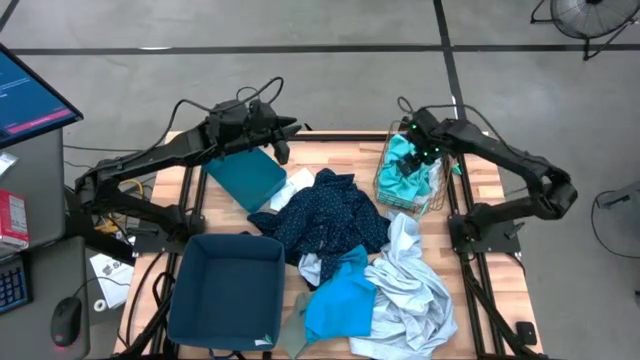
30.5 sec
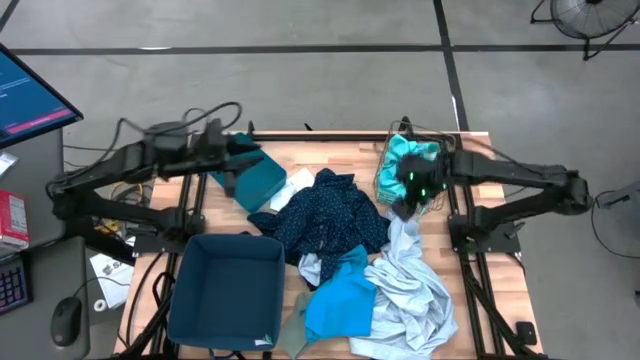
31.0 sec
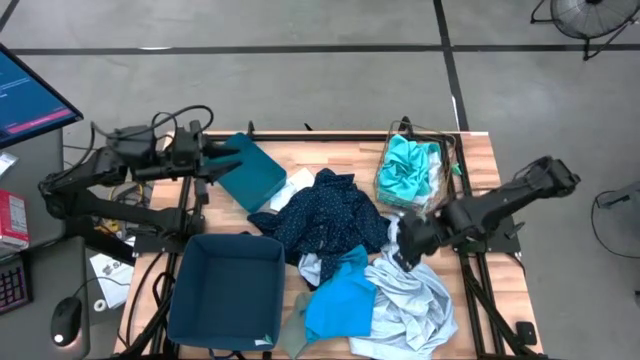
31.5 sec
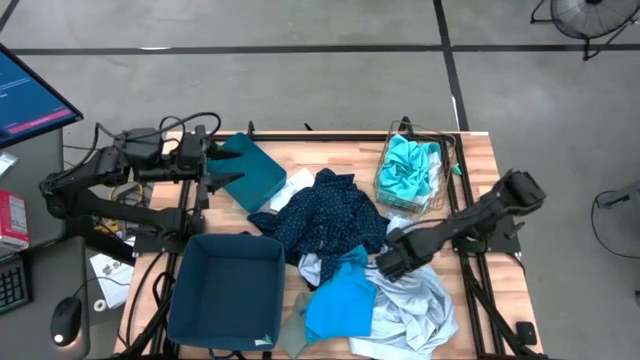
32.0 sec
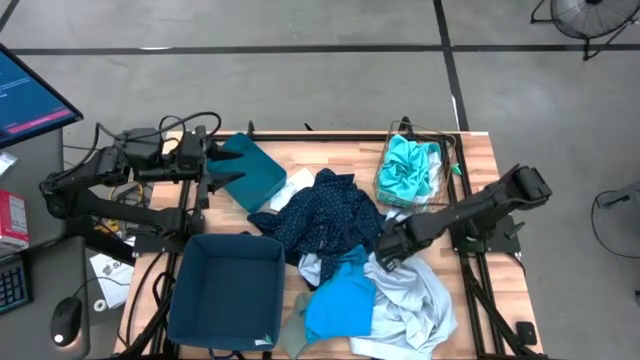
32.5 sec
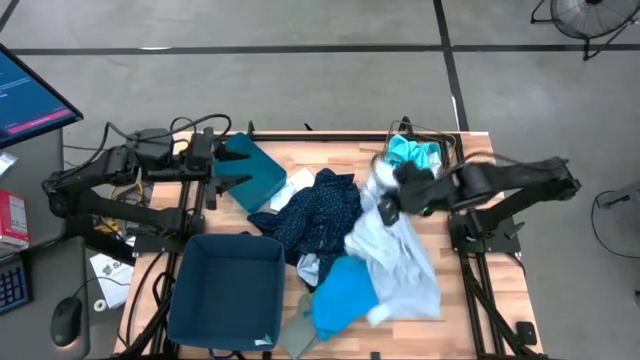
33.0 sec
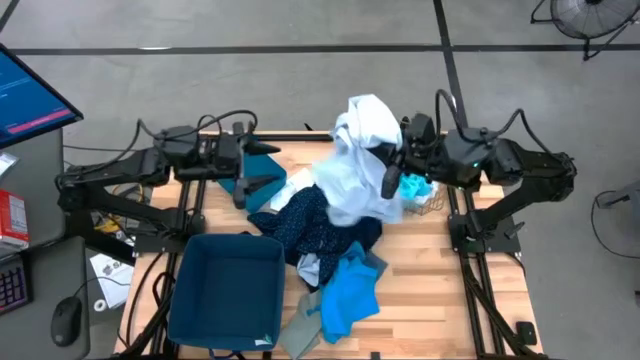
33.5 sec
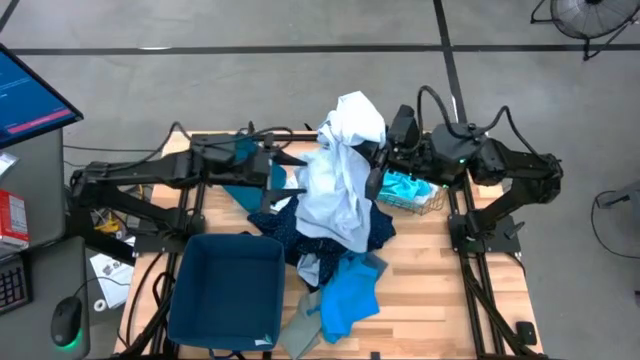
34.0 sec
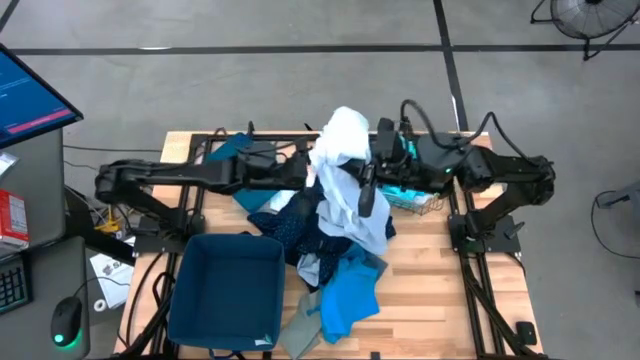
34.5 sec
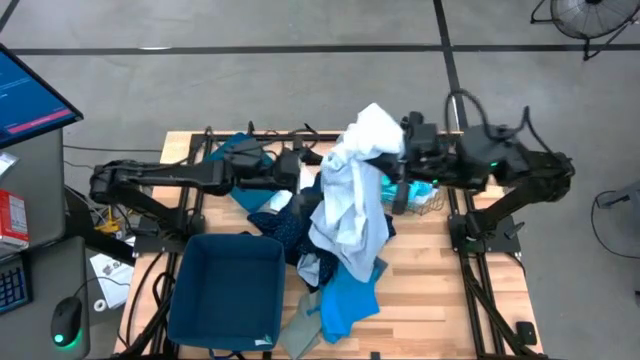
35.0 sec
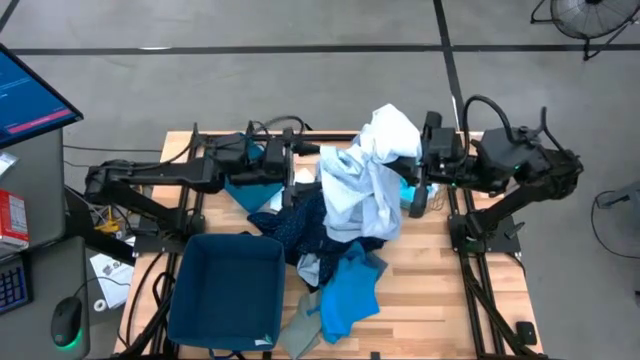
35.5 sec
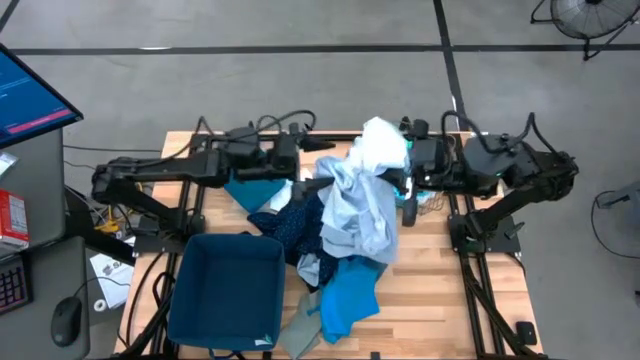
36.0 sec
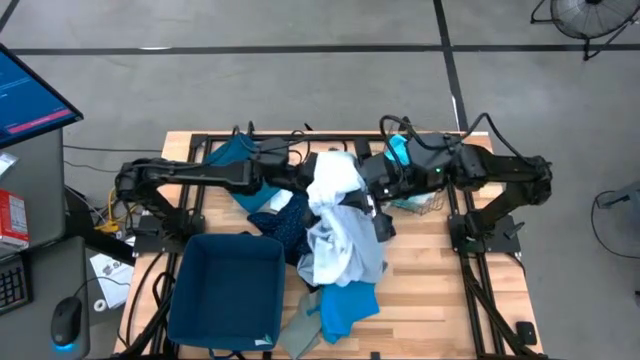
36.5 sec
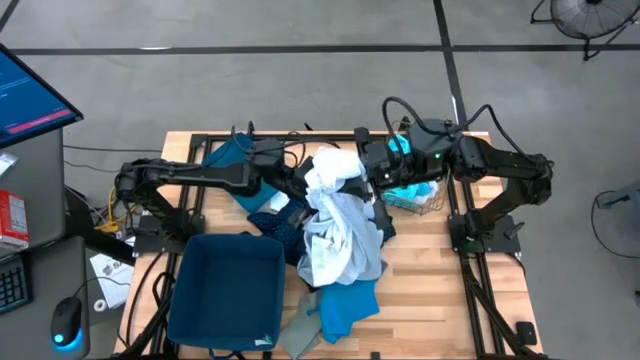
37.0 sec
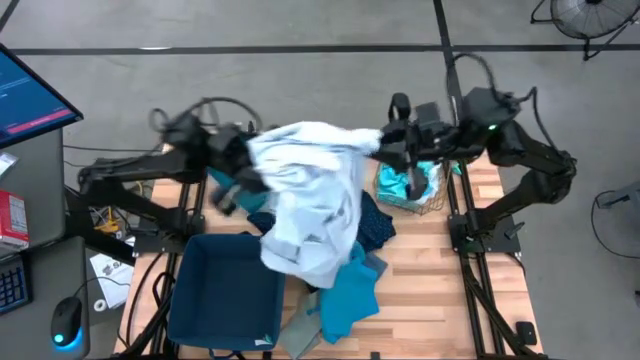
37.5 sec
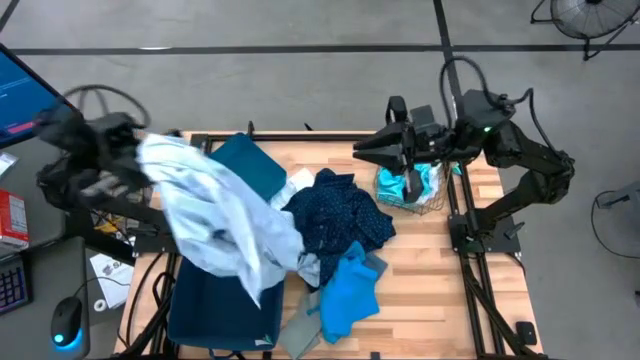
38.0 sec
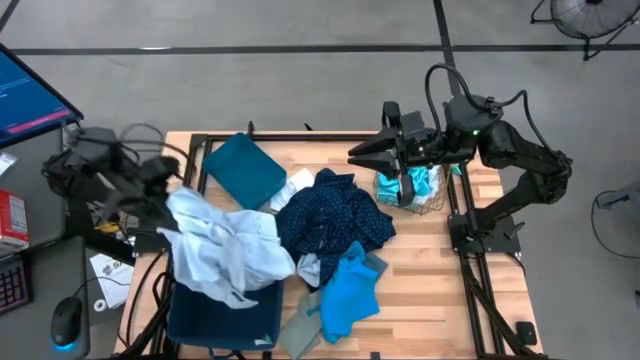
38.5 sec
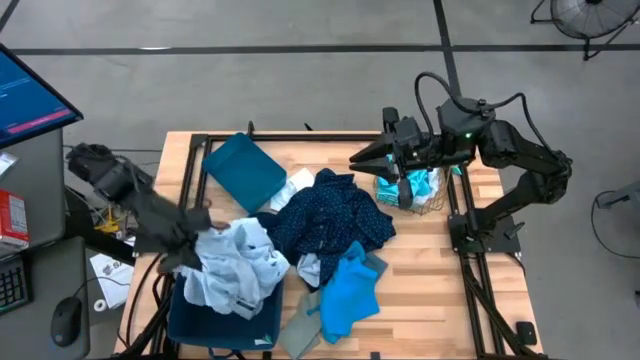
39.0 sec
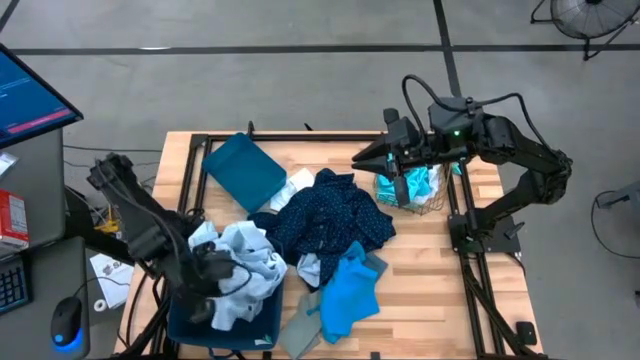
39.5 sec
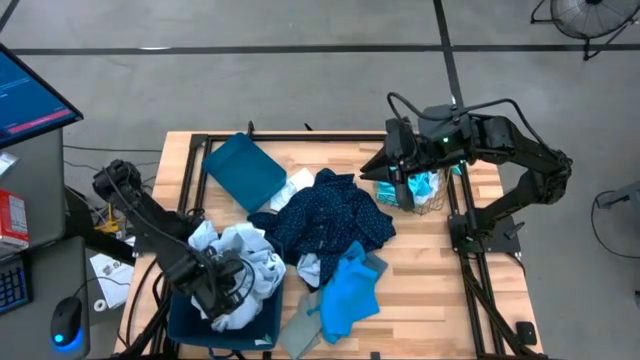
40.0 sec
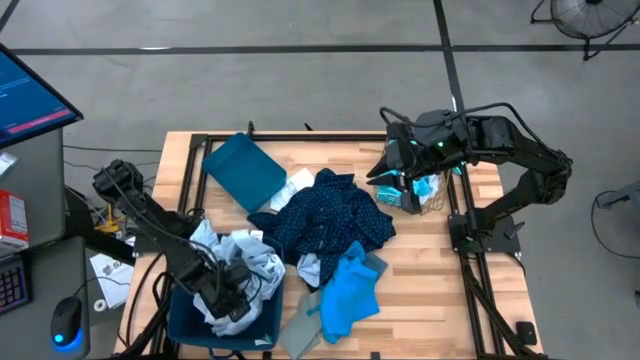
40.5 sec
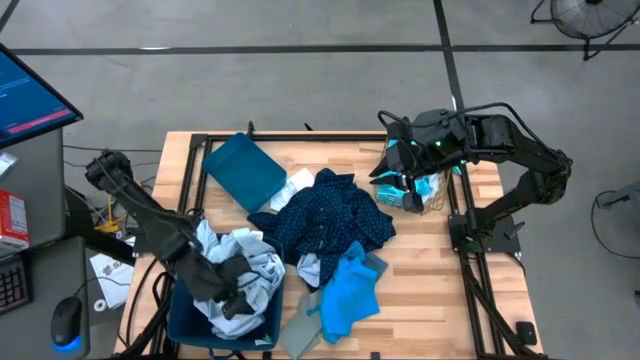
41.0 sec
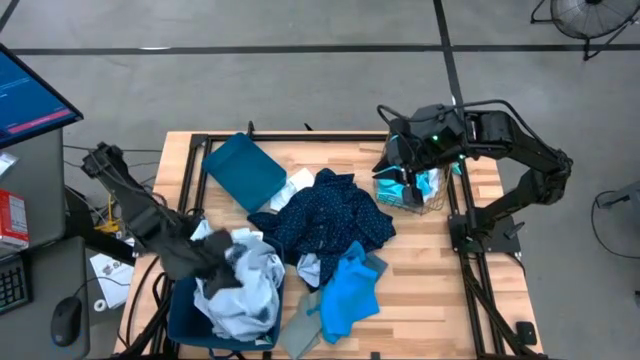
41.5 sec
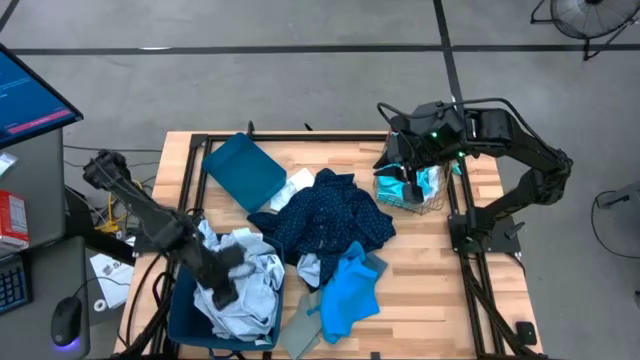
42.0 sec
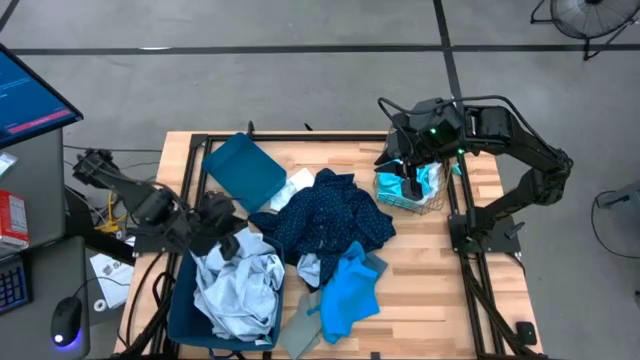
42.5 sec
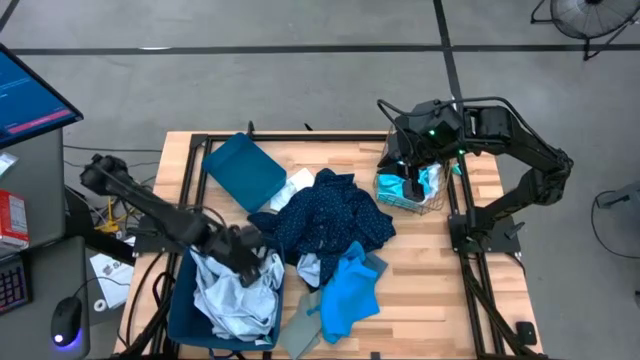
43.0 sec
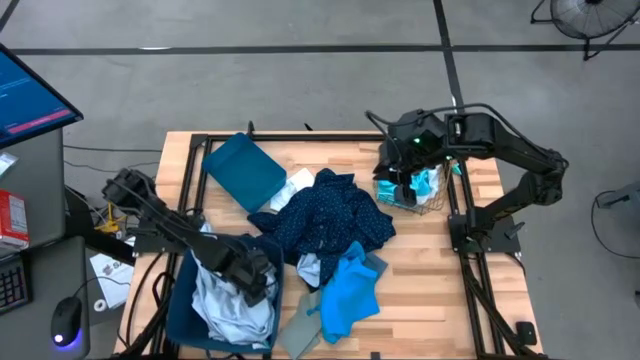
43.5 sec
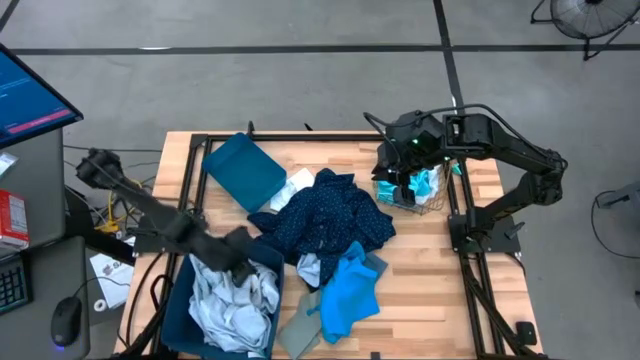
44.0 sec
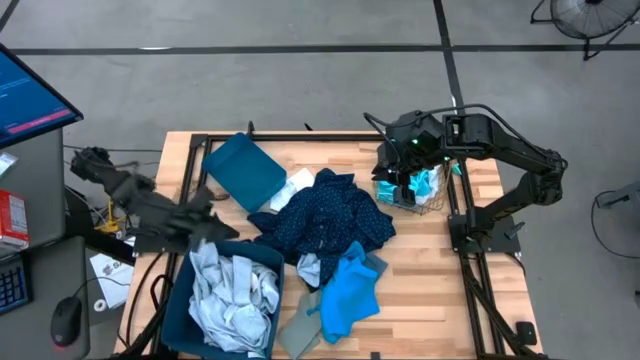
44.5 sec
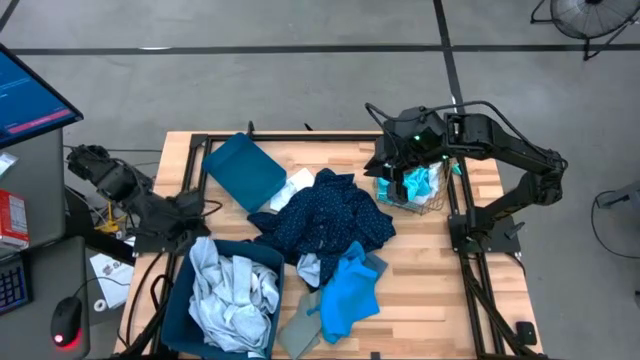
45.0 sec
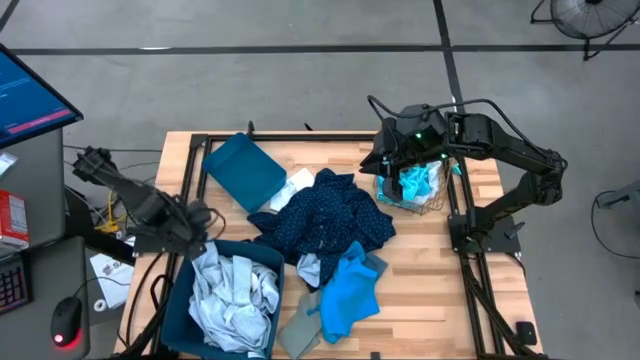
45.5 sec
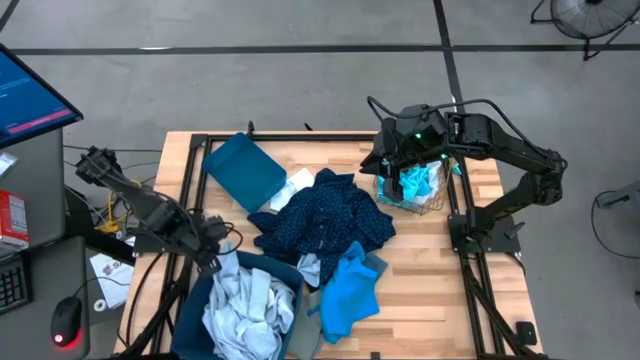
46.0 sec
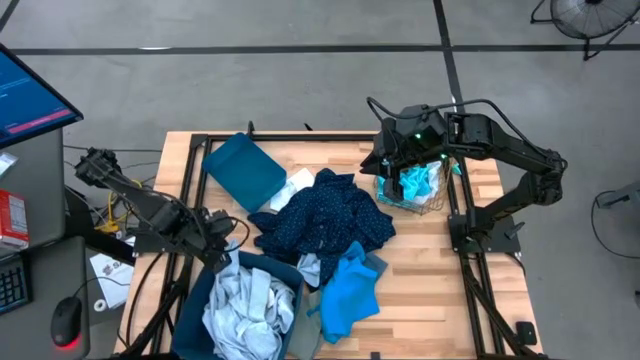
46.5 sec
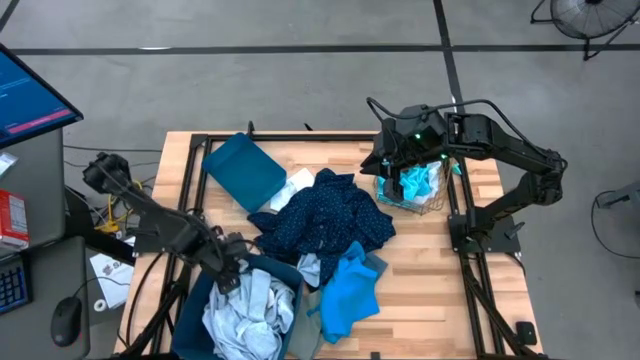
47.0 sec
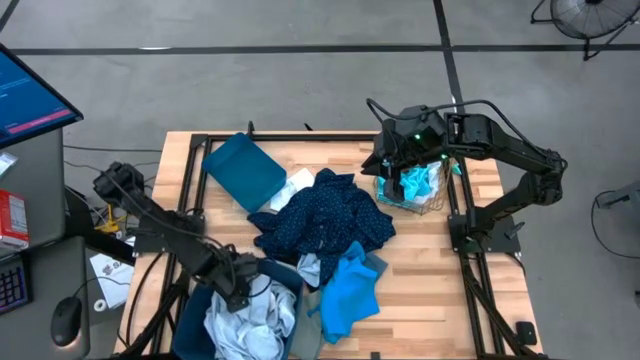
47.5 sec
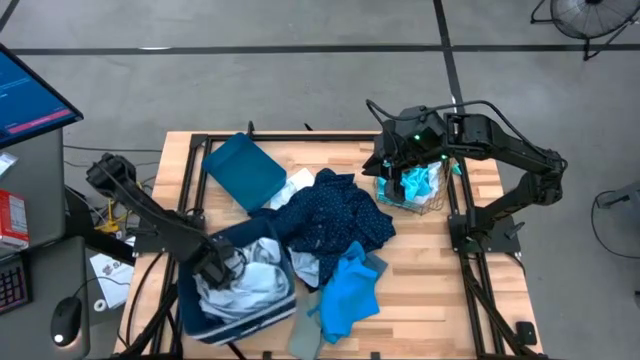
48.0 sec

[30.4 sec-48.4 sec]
Task: Pick & Place Cloths
Put the white patterned shirt into the blue basket

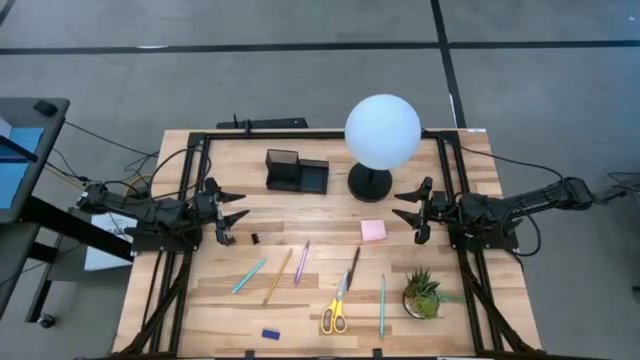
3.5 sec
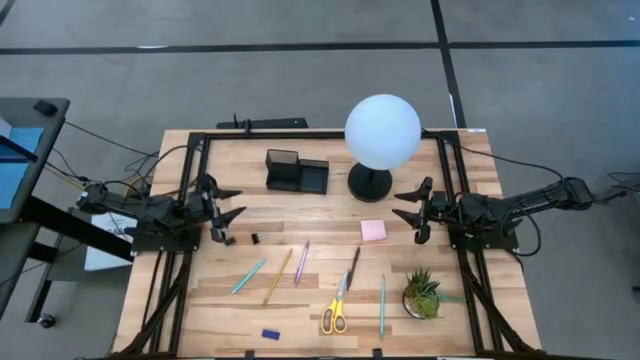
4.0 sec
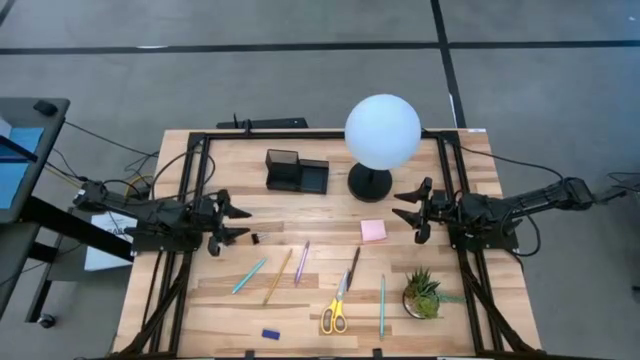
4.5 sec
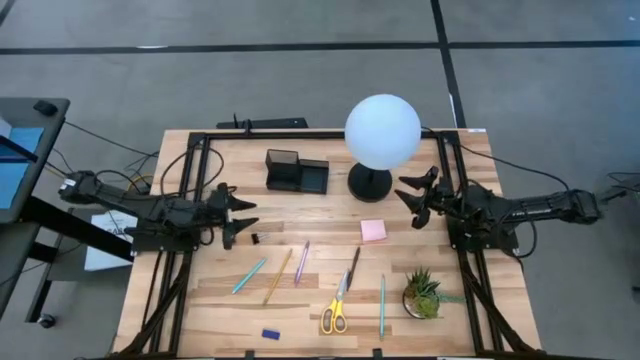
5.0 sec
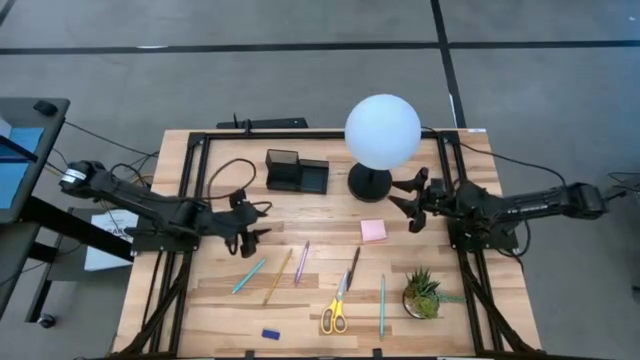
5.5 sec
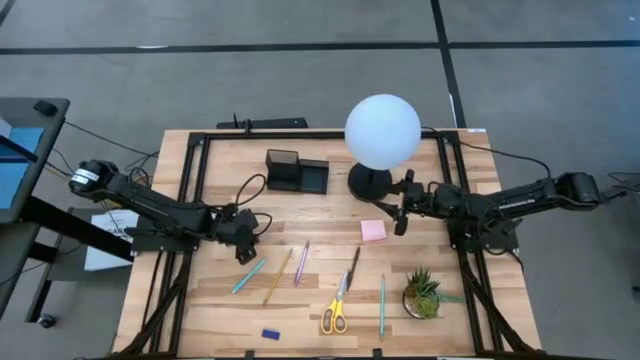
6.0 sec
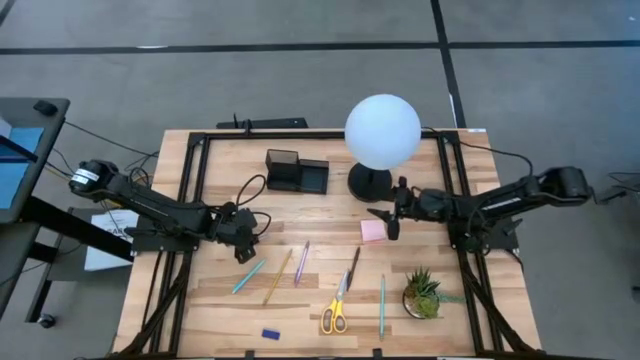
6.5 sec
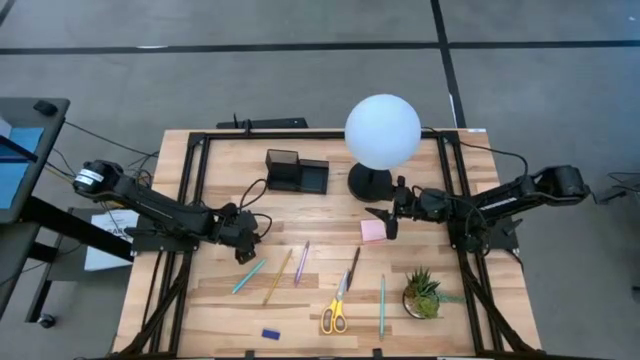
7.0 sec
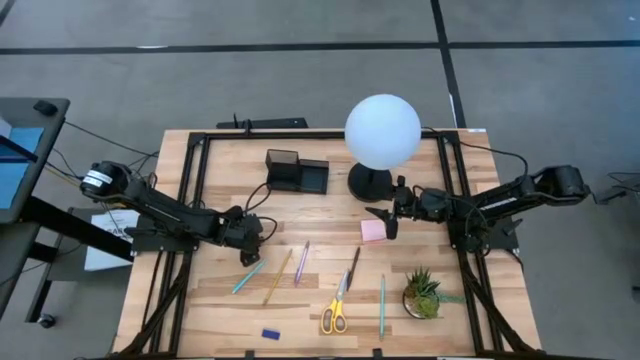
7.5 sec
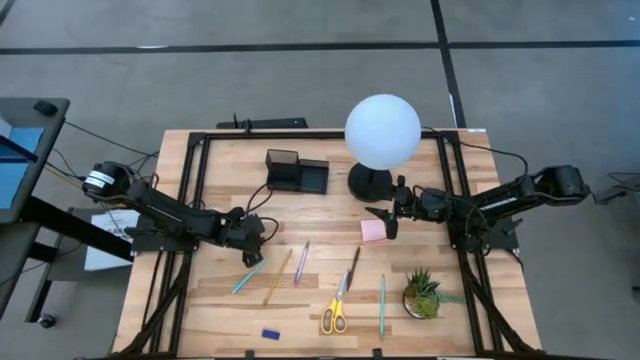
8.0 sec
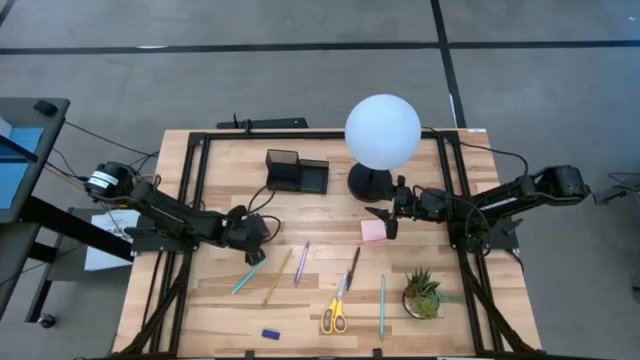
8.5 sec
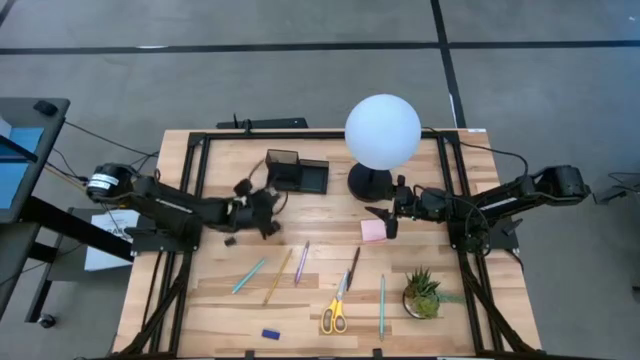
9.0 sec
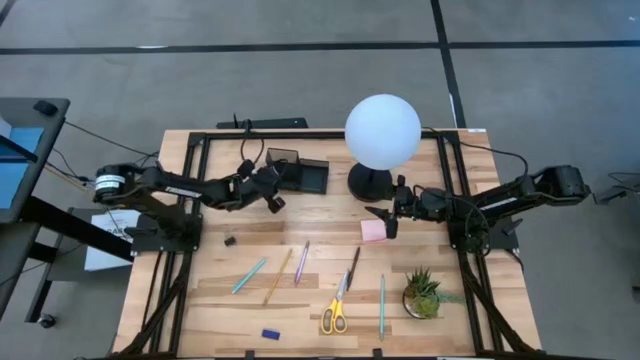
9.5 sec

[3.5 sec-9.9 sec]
Task: Pick and place office supplies into organizer
Put the right black binder clip into the black desk organizer
